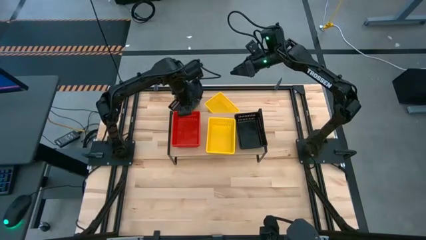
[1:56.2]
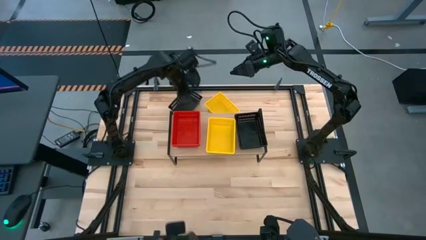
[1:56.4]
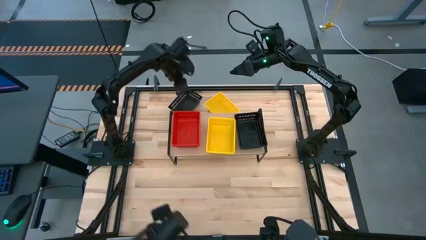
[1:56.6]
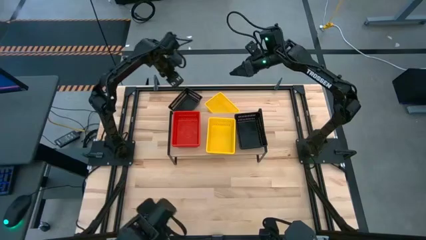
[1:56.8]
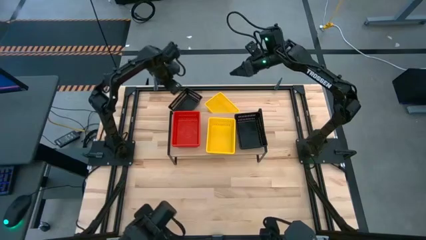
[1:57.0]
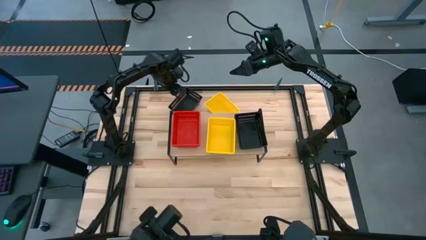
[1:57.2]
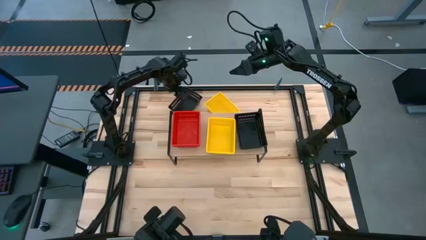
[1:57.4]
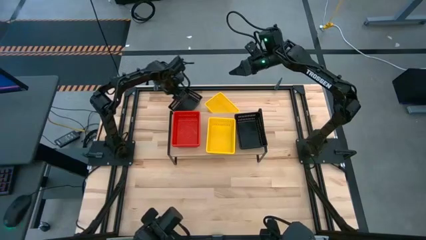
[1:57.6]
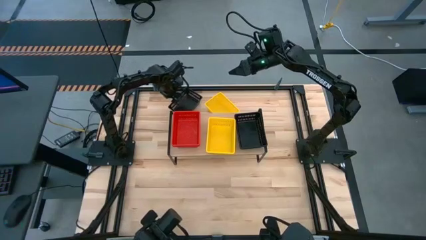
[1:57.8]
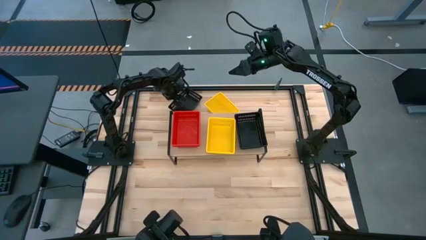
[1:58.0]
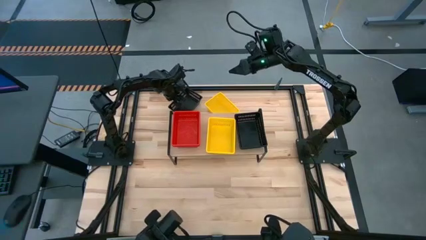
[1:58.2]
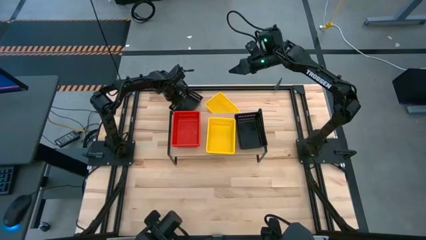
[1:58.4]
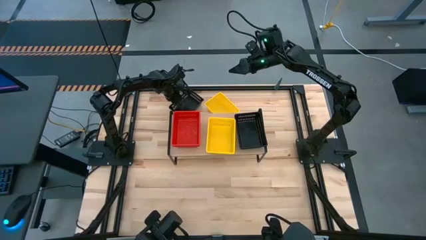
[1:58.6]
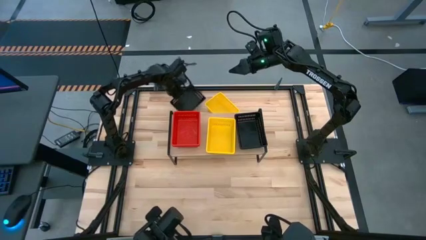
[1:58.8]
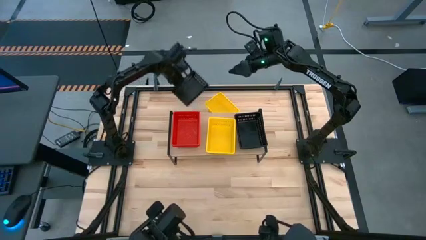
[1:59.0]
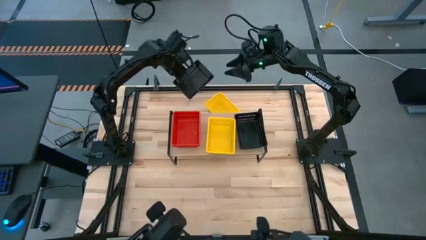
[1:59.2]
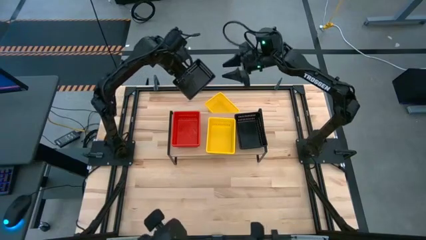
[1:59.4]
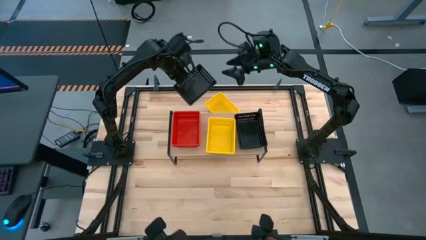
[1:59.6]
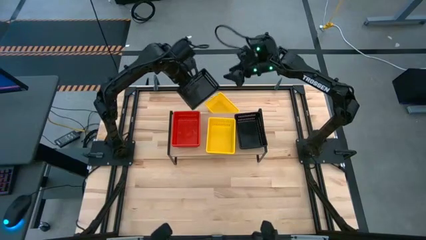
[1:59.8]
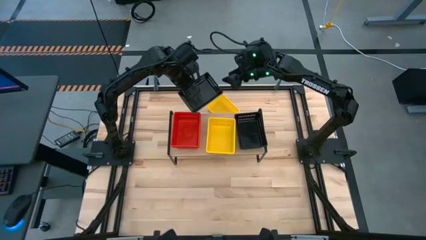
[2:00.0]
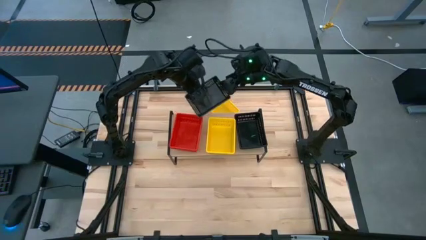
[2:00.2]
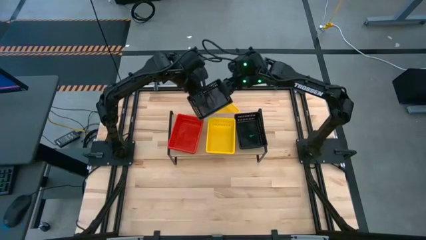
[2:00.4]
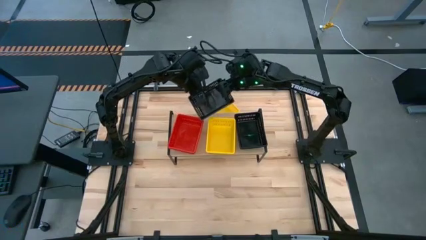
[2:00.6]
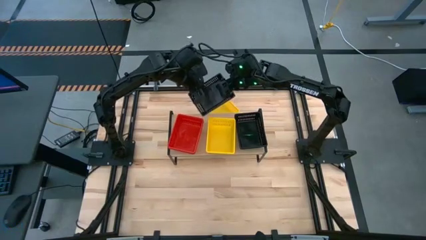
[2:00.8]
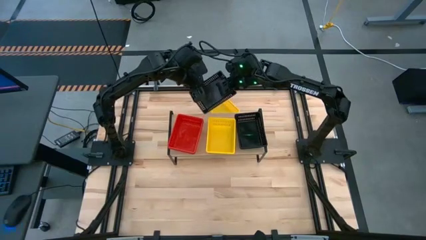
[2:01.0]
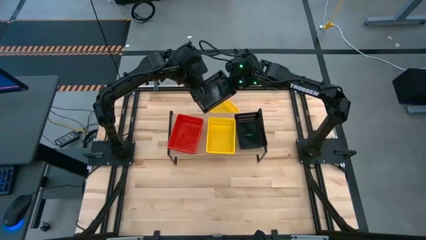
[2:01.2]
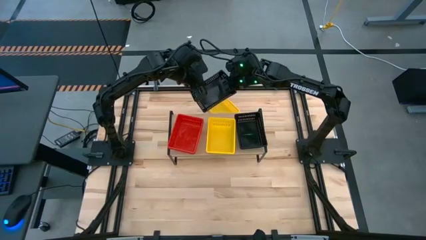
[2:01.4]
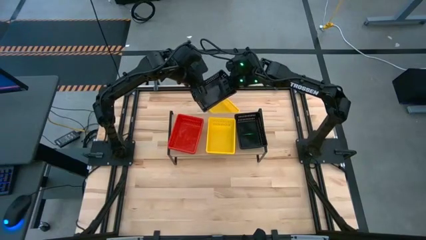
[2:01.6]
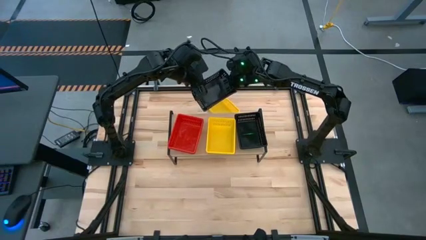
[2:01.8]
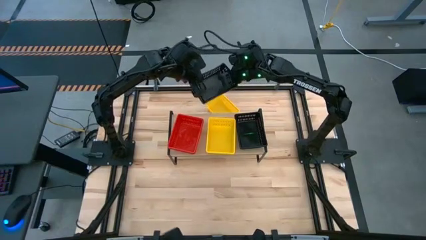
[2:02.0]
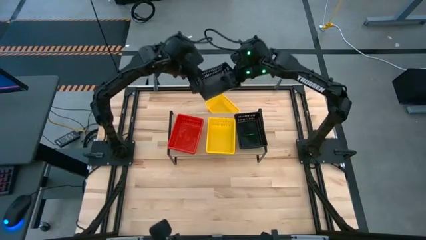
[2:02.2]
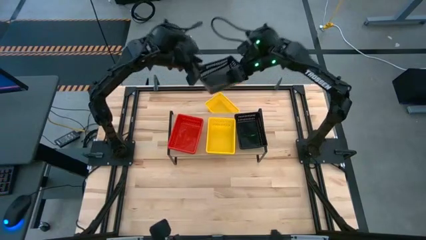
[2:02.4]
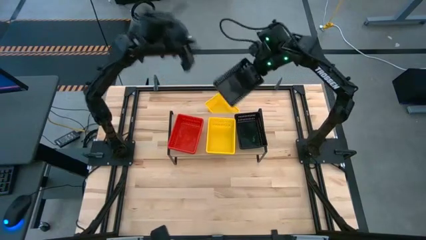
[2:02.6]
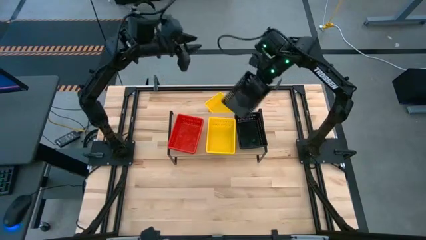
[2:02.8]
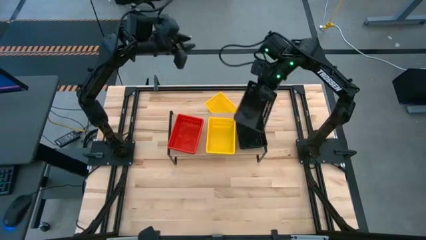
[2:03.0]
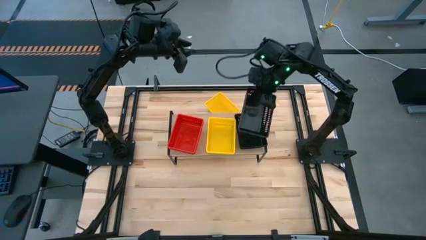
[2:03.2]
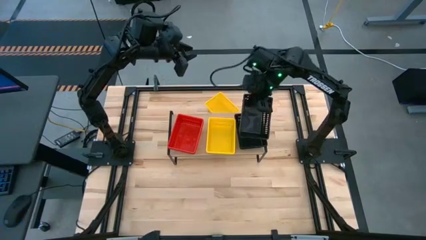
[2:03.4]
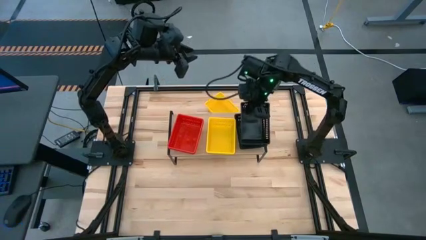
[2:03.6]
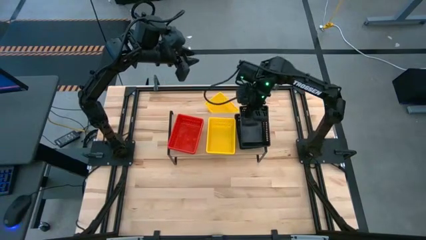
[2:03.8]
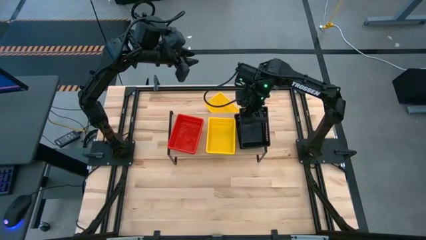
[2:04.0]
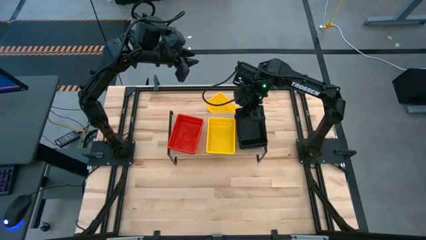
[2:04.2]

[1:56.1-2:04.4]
Task: Stack baskets on shelf by color
Stack the black bin on top of the black bin on the shelf

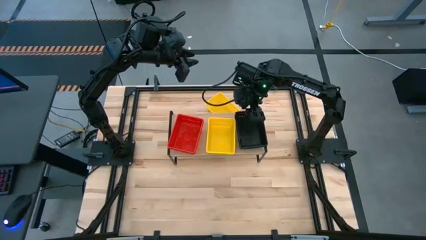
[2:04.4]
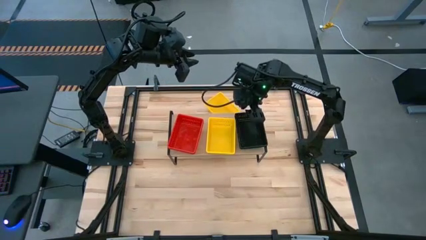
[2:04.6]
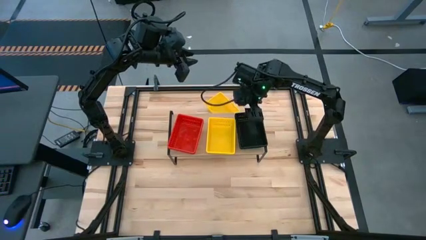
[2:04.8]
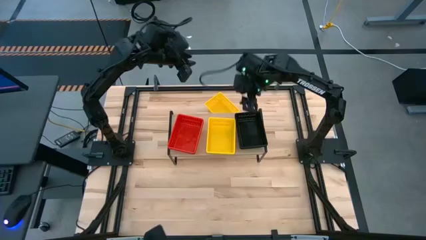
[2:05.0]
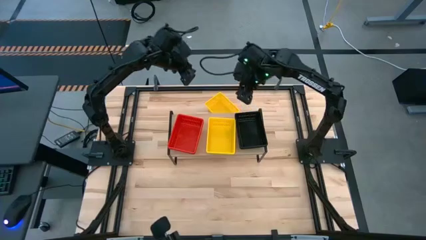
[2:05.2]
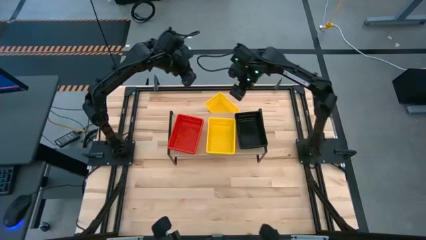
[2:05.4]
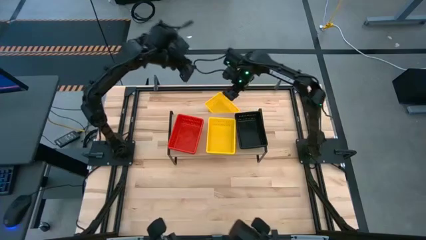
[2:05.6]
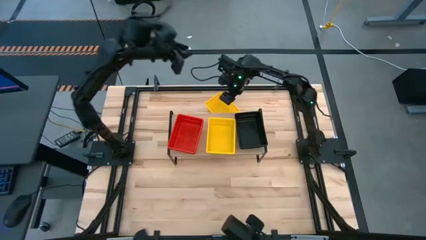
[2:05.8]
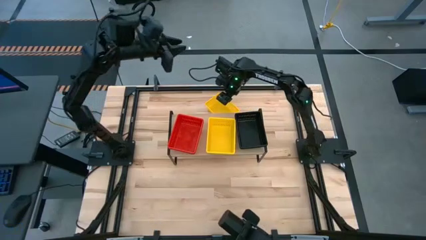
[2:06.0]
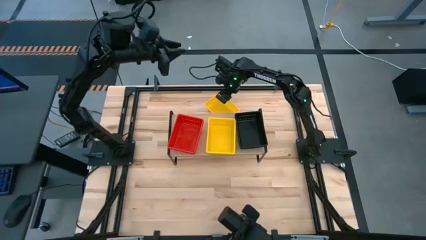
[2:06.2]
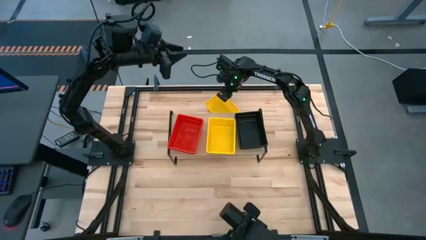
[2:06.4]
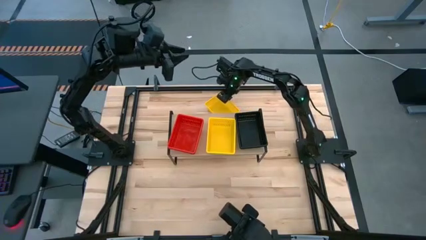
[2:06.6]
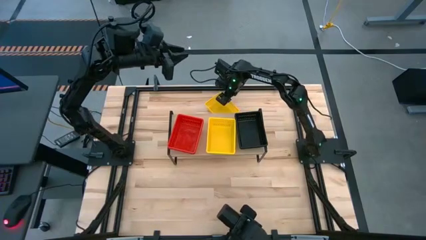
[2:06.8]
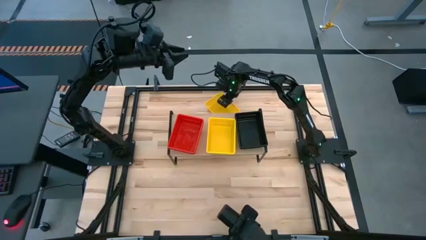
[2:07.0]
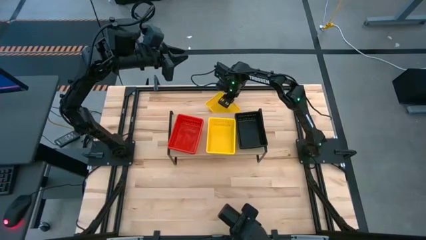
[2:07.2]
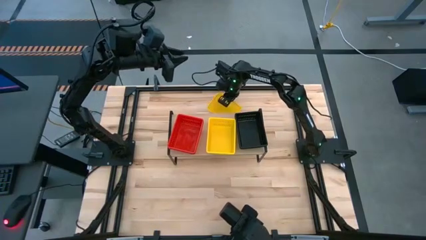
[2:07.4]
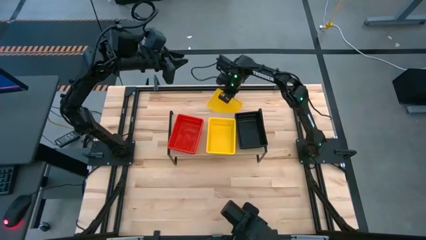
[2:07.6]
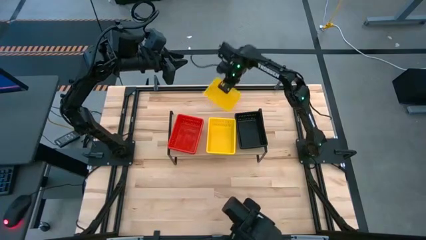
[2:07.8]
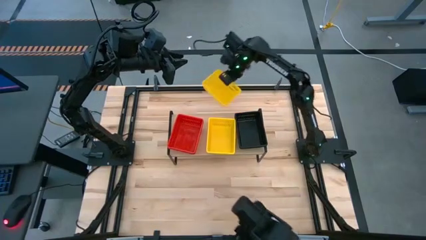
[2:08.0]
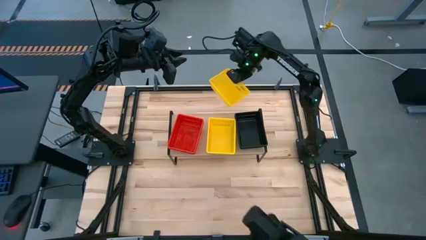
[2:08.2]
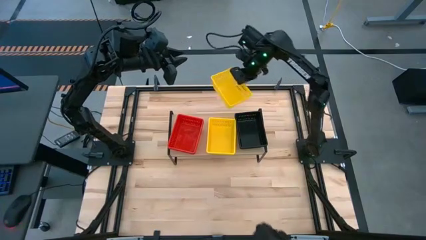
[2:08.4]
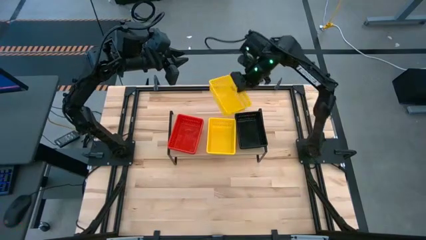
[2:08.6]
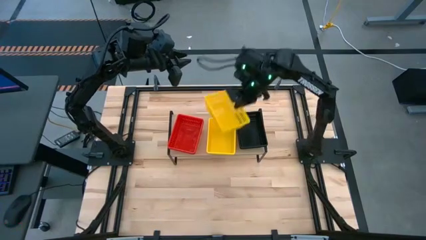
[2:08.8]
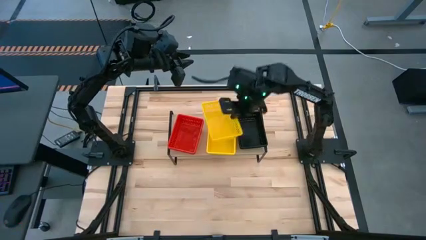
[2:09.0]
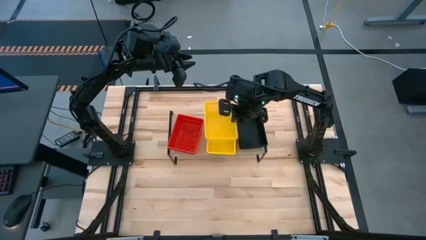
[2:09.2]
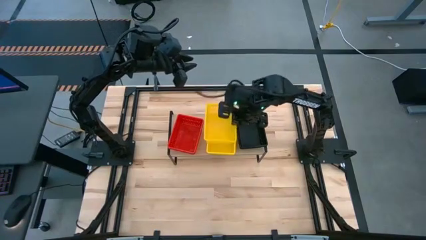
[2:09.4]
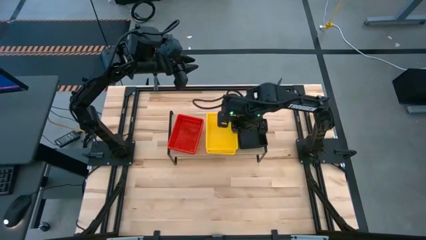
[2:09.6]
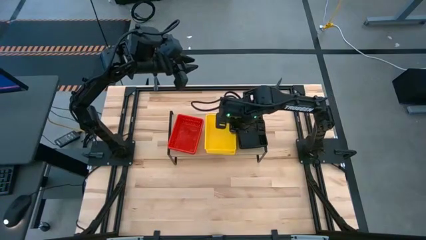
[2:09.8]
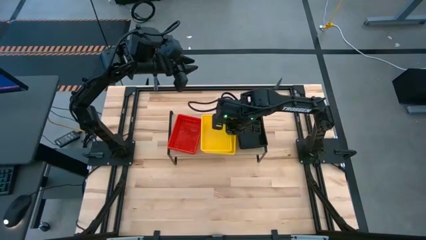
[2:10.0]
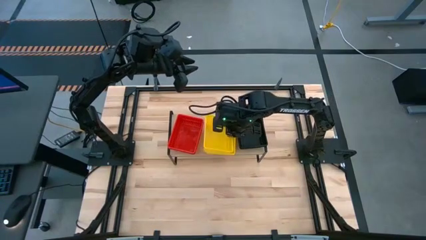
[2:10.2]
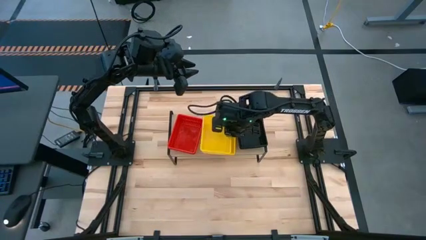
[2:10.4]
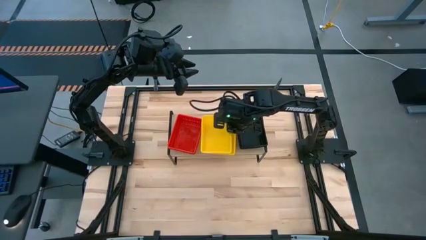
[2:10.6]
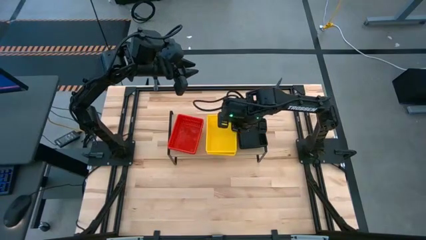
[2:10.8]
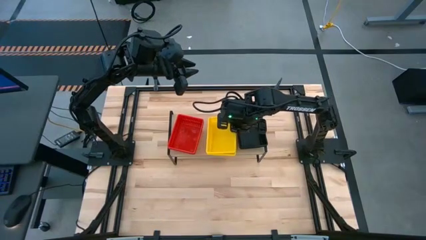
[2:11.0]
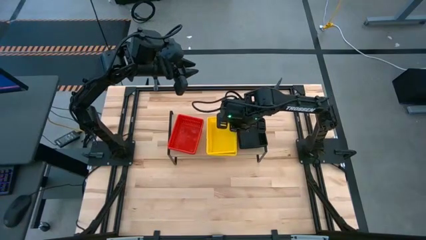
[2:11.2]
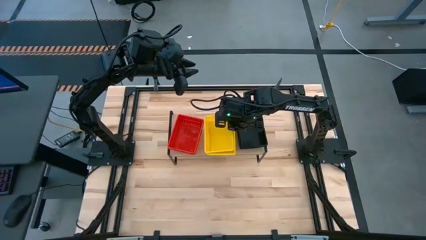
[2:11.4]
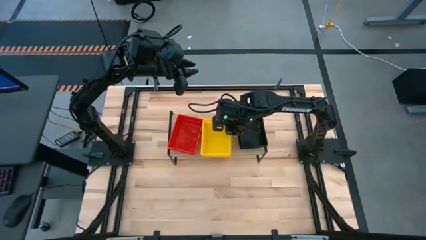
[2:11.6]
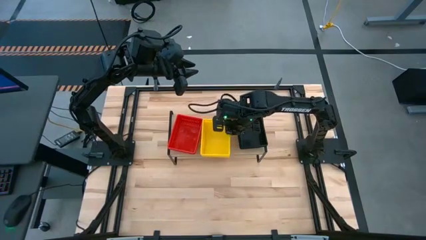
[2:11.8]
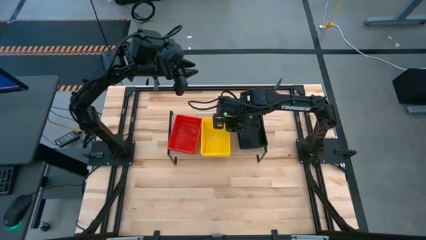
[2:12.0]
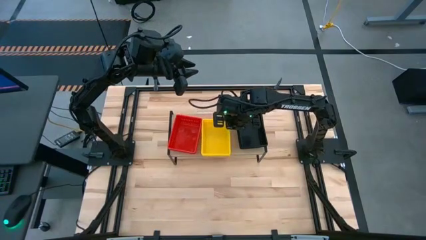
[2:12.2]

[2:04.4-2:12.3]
Stack the yellow bin on top of the yellow bin on the shelf

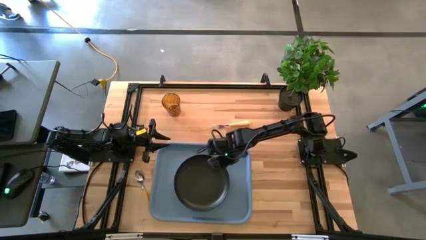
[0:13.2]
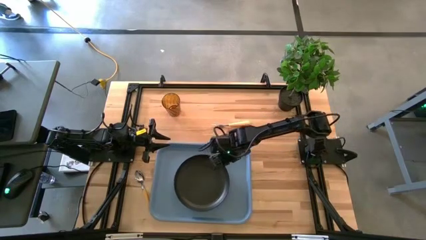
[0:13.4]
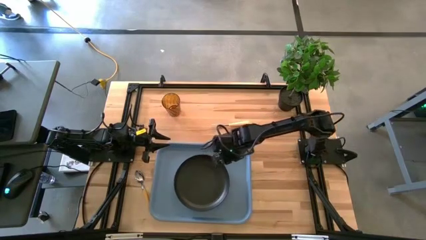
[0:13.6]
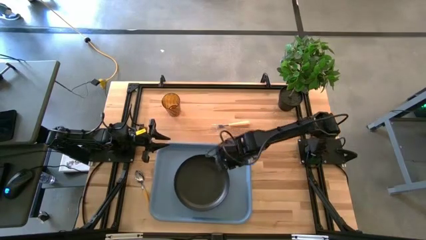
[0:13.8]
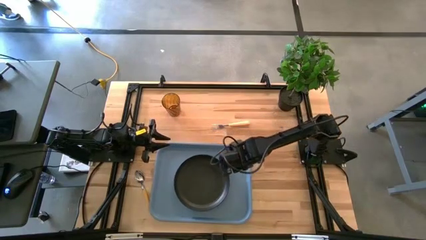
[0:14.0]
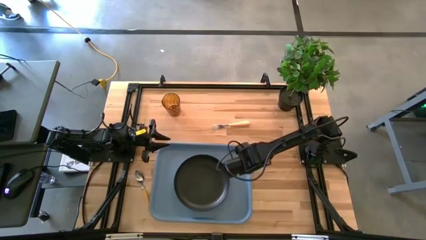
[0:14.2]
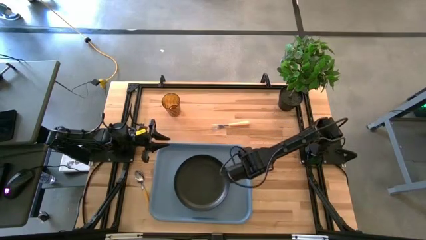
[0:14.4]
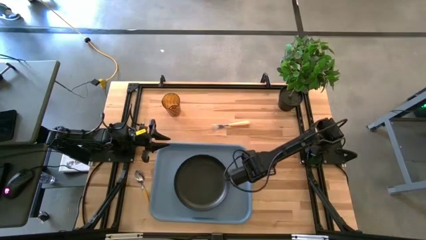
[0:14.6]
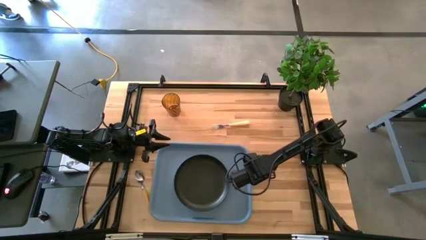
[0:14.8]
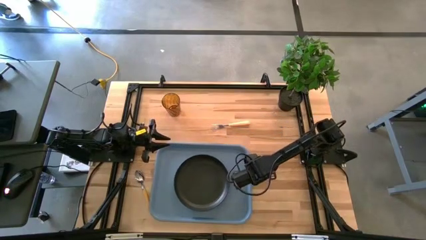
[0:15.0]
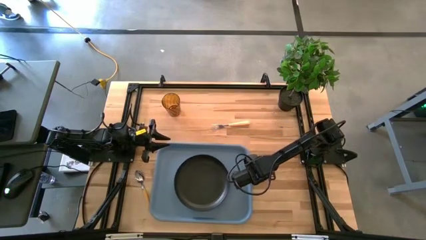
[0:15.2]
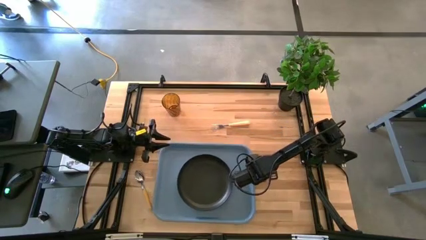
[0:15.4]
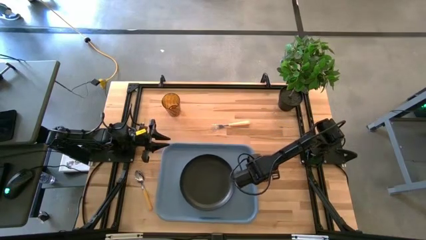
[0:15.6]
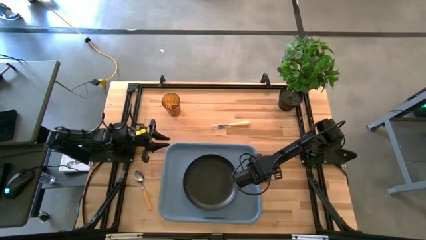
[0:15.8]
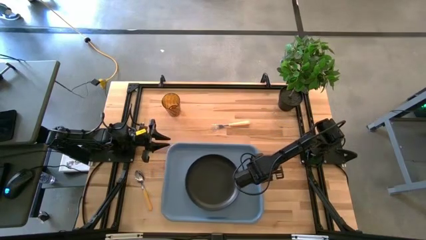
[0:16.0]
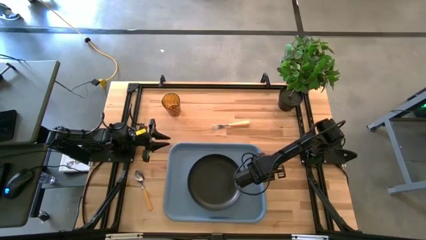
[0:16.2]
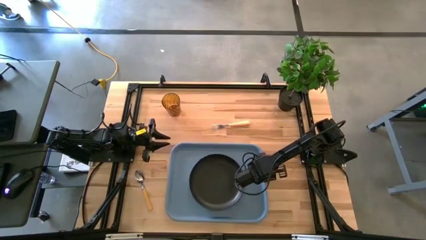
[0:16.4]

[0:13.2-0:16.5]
Task: Pick and place plate/cup/fork/spoon on tray
Adjust the blue serving tray
